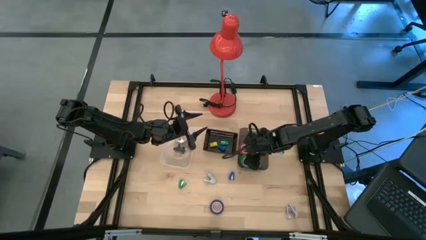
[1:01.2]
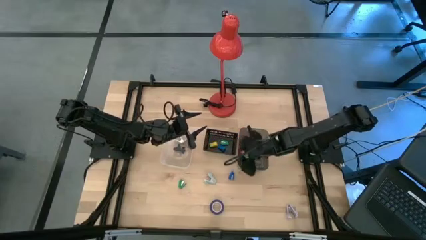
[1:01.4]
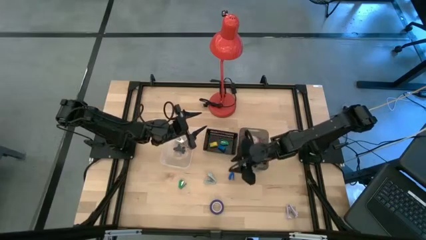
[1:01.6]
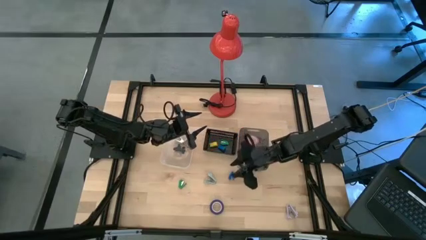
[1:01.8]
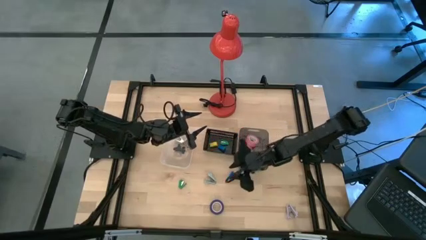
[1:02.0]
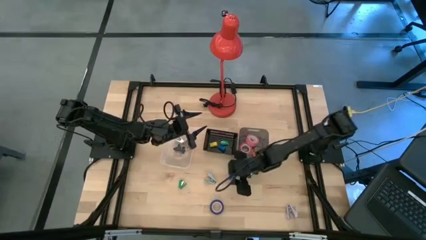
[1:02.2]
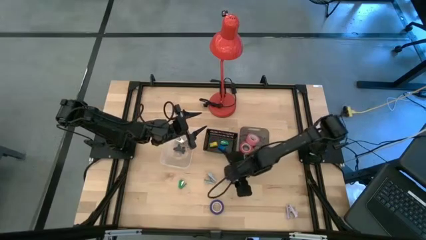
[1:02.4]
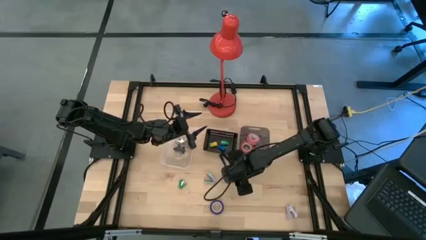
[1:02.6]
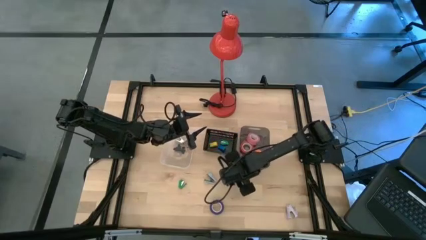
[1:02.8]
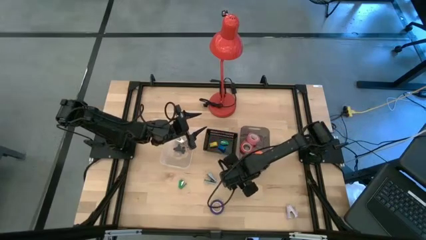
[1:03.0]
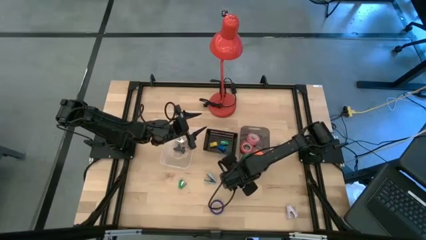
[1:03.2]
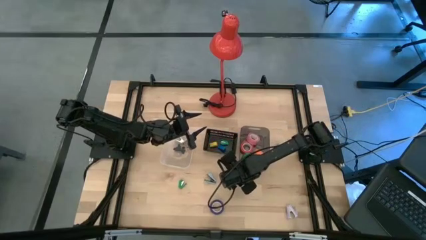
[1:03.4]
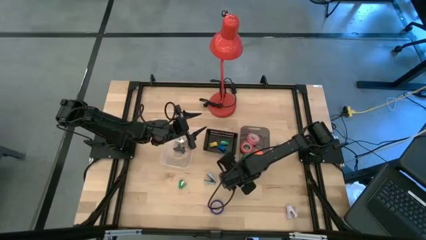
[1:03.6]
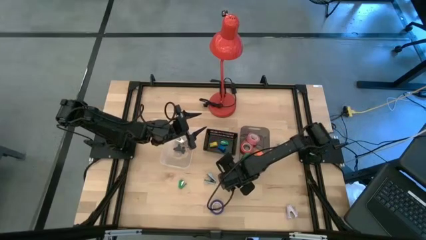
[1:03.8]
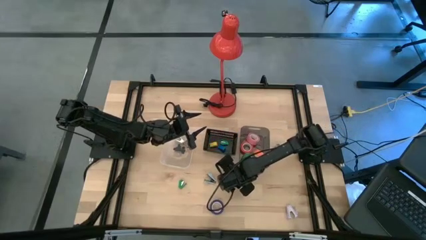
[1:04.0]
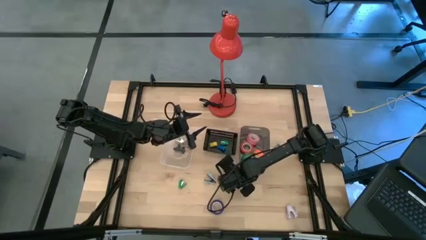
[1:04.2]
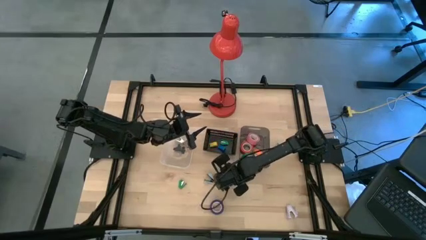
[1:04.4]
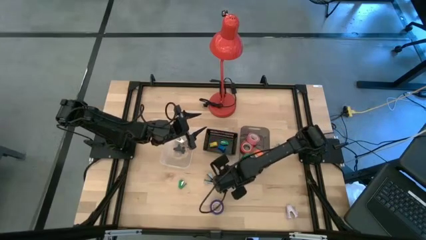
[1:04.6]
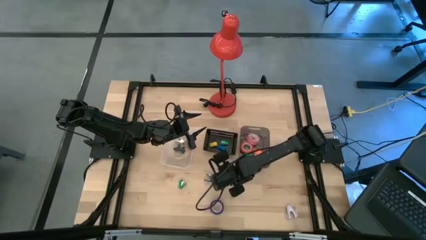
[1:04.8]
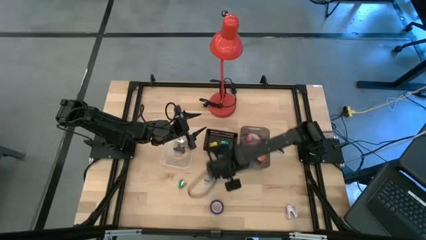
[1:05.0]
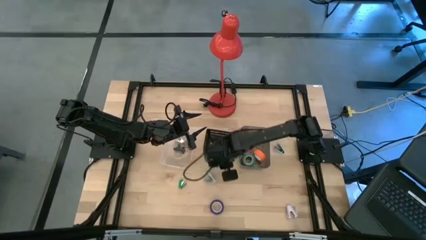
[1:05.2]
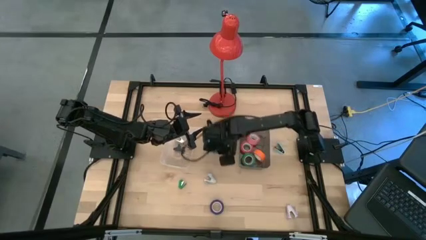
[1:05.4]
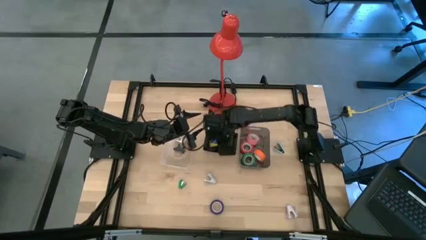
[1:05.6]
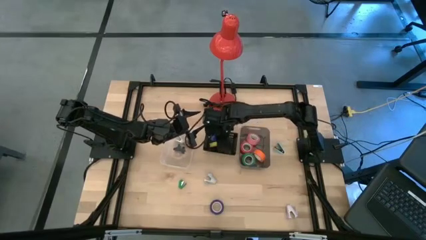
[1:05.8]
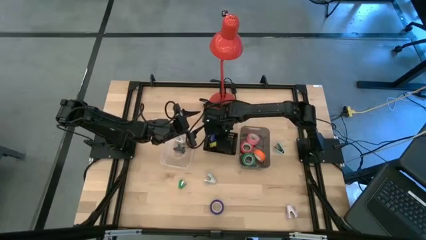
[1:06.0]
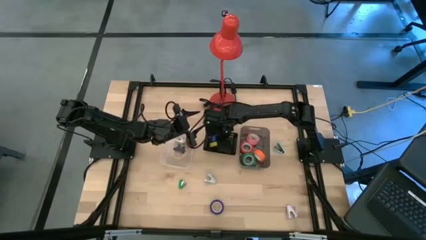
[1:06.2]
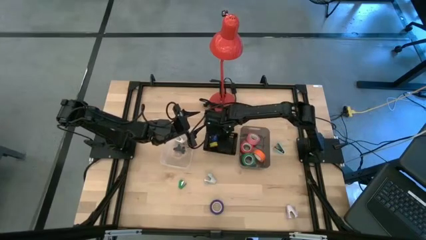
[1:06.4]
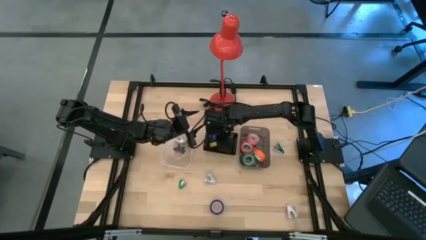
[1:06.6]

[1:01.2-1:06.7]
Task: Pick and place Stapler, Stapler remover, tape
Put the blue stapler into the black basket

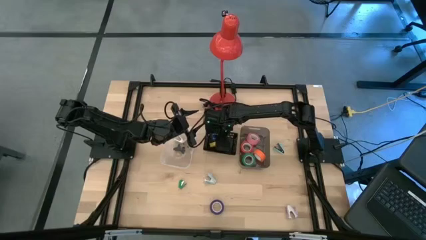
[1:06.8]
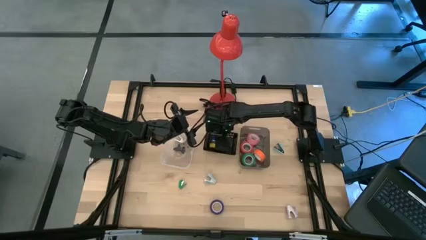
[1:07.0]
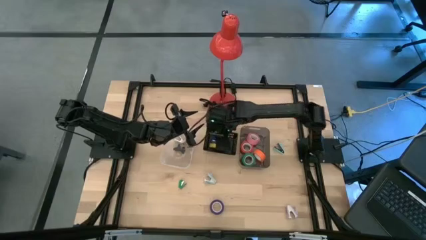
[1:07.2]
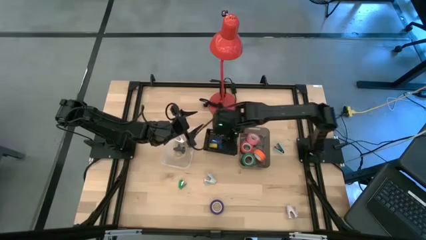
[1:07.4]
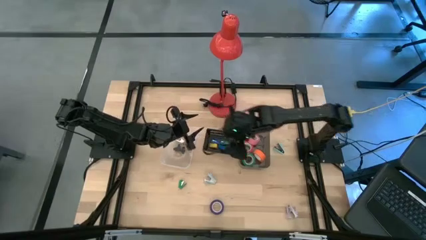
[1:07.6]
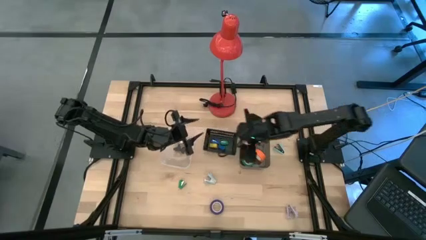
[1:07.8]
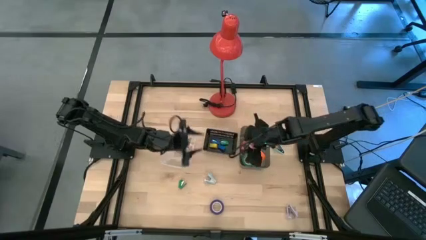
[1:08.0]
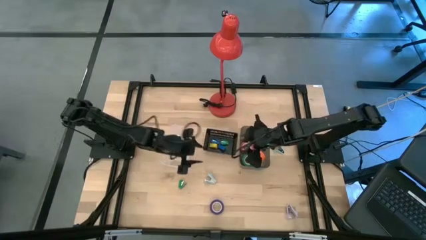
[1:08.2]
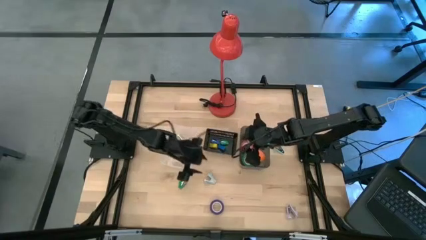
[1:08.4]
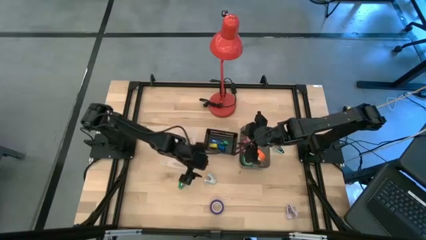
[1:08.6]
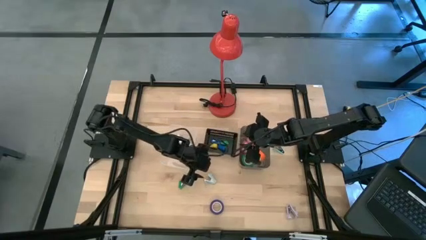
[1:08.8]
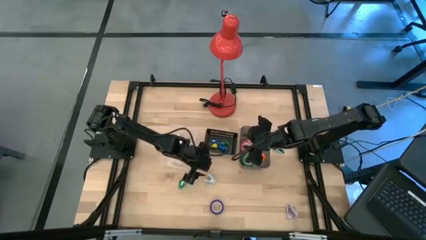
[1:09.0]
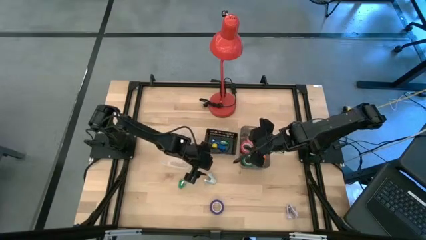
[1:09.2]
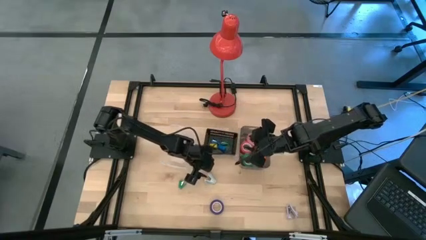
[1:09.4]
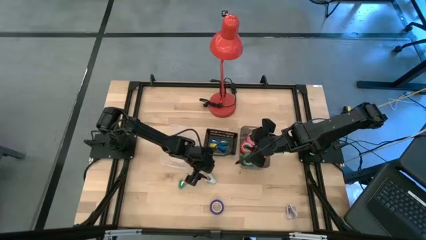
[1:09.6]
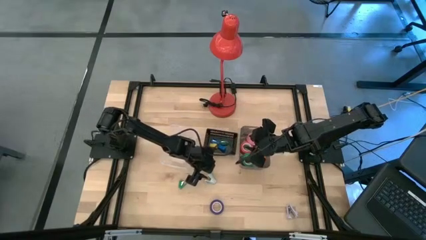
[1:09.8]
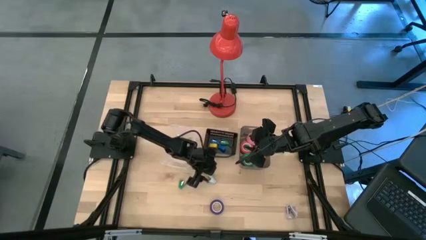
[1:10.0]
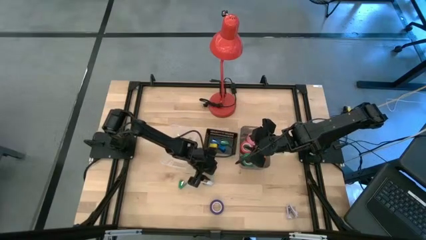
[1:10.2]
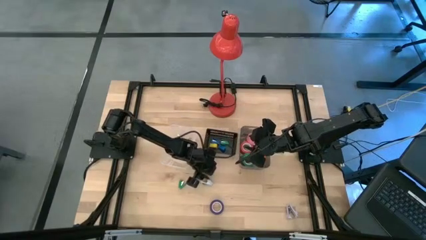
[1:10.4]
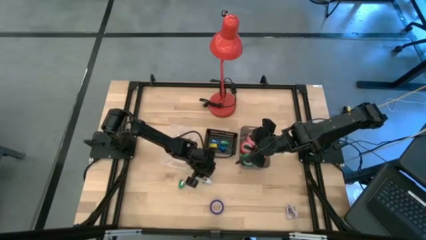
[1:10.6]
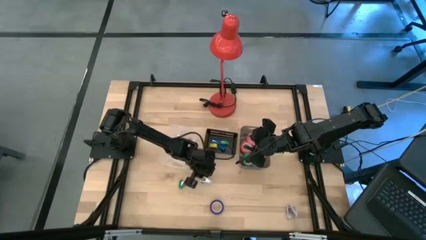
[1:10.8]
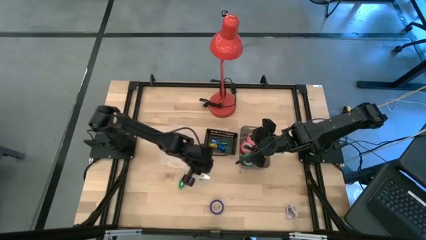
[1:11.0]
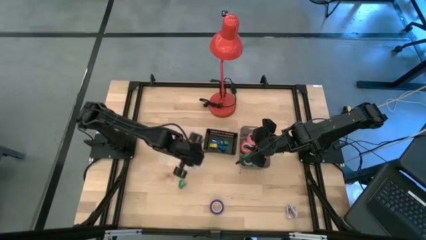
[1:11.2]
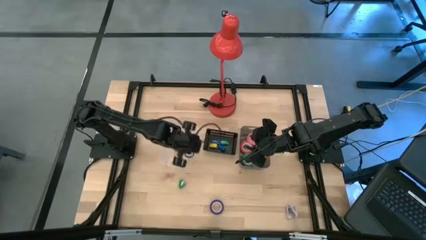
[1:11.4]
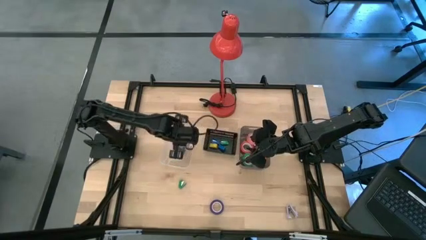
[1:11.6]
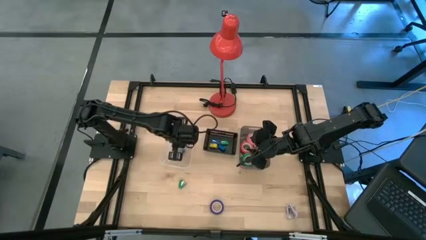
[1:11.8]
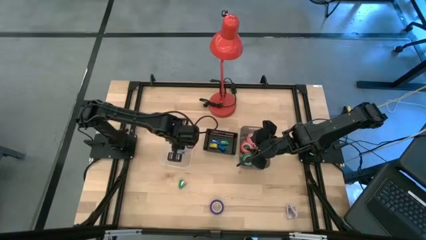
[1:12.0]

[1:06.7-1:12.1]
Put the light blue staple remover into the transparent bin

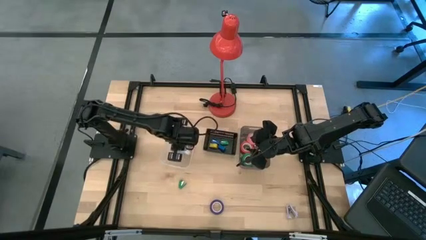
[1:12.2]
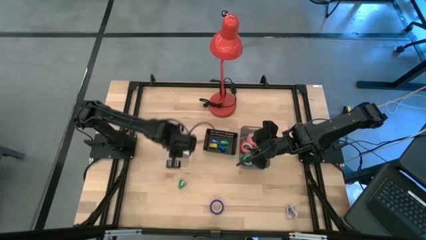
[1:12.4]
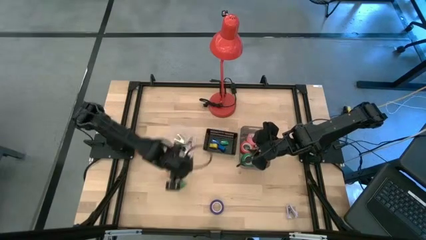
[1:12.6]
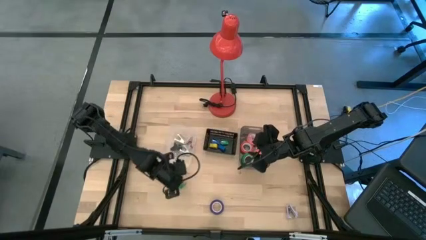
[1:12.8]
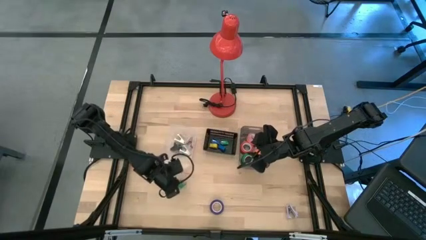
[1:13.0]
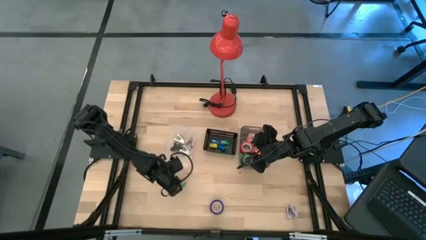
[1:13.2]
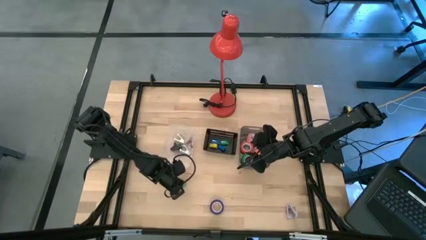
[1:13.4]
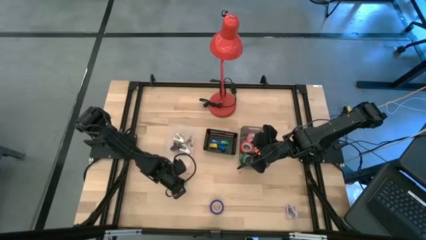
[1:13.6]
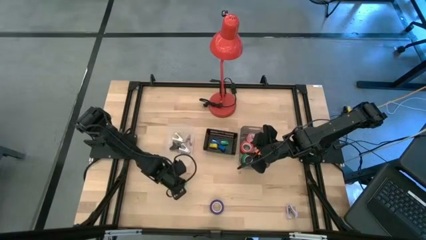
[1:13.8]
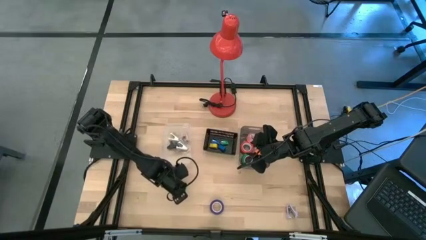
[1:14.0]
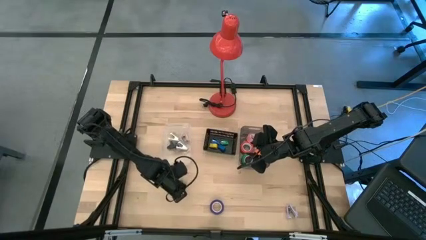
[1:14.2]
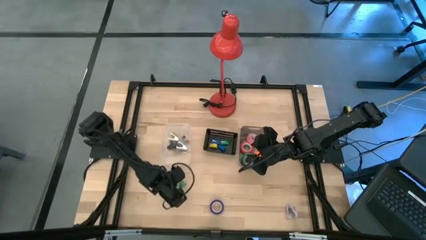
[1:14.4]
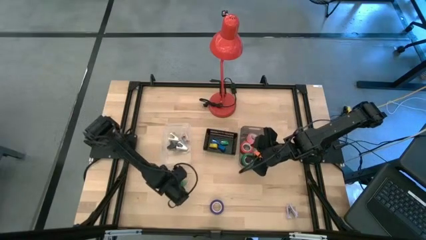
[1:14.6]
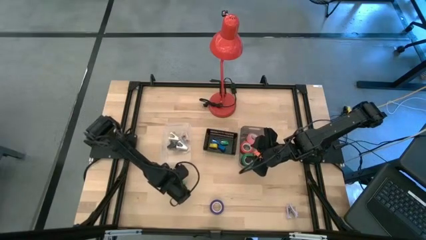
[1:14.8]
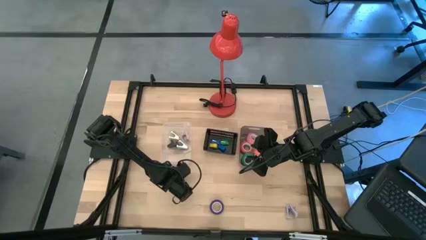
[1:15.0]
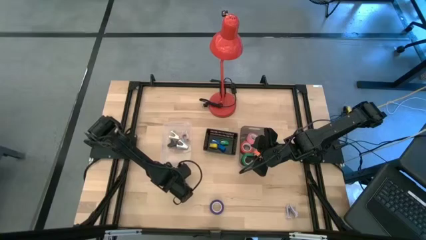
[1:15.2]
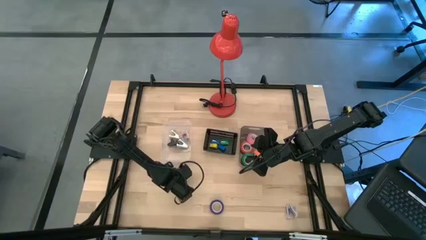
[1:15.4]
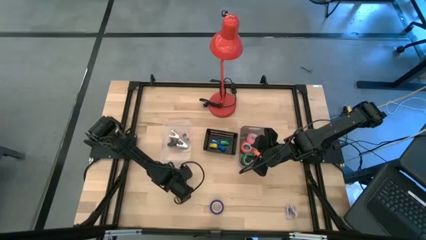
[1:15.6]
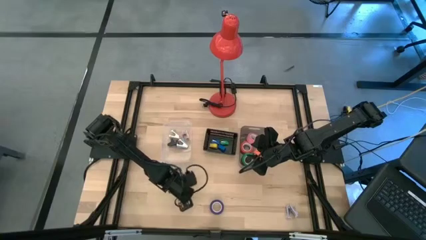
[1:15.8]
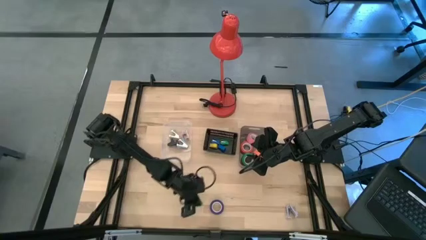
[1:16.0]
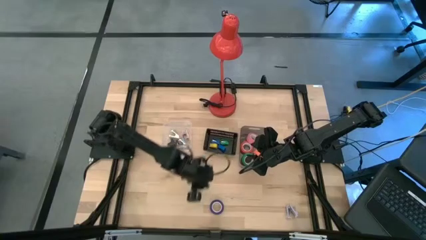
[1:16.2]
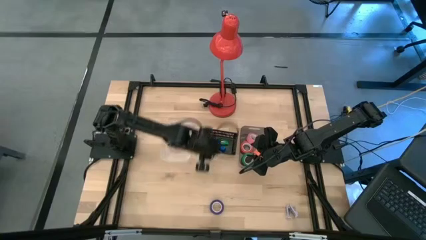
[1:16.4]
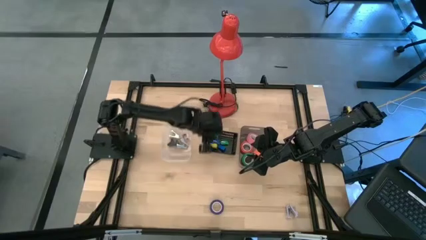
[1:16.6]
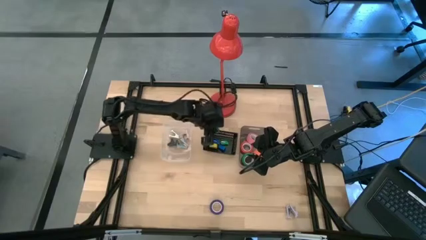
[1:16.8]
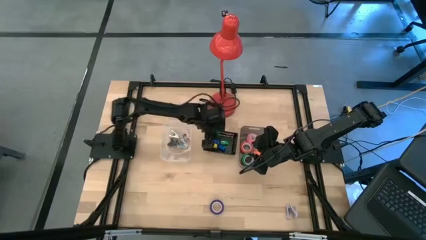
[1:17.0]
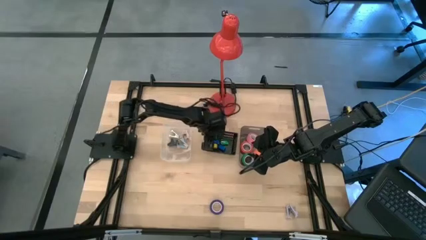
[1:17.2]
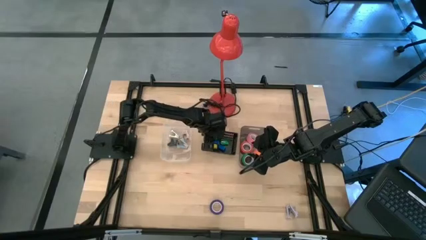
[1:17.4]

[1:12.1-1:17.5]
Put the green stapler into the black basket
